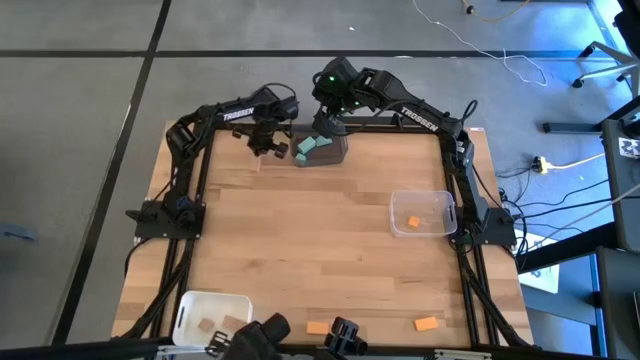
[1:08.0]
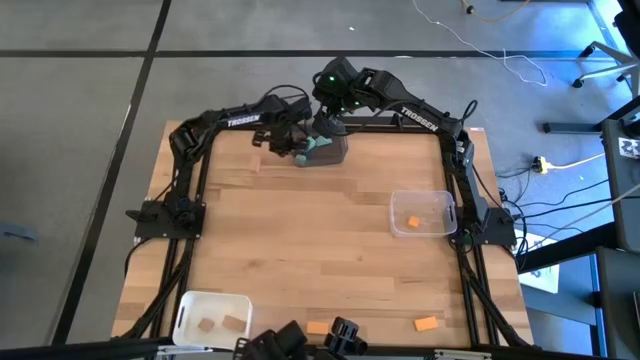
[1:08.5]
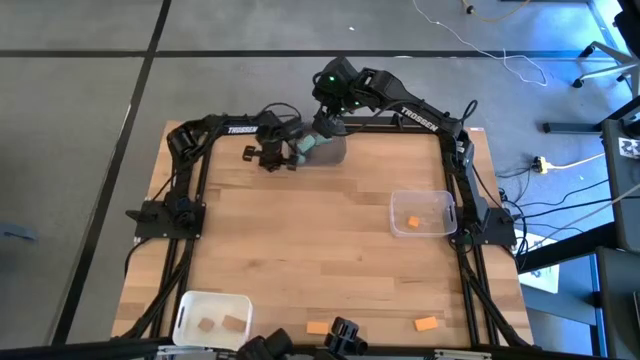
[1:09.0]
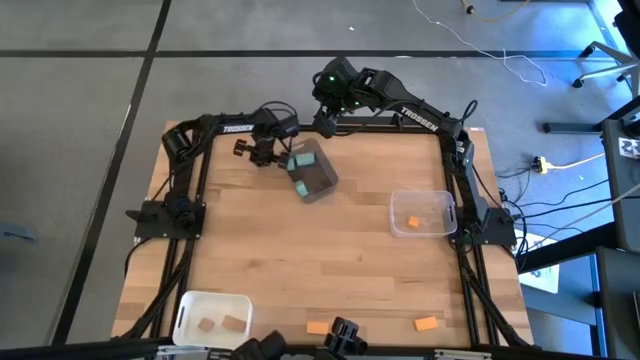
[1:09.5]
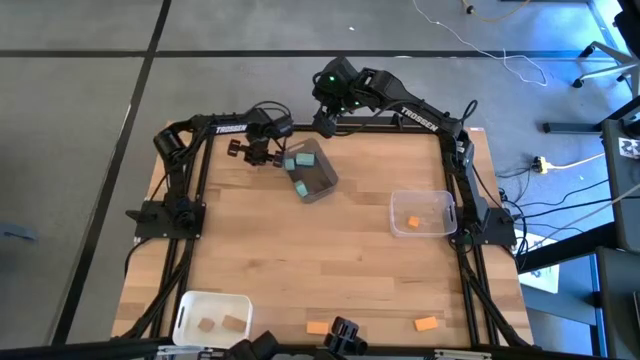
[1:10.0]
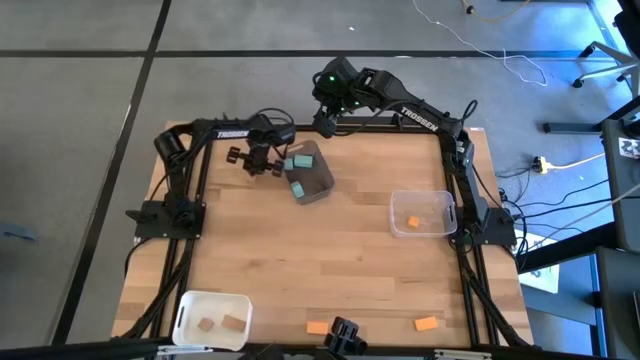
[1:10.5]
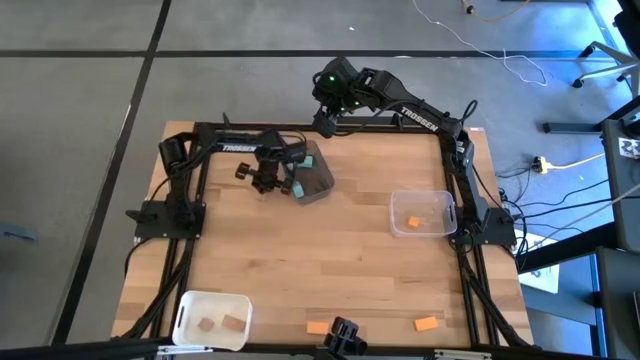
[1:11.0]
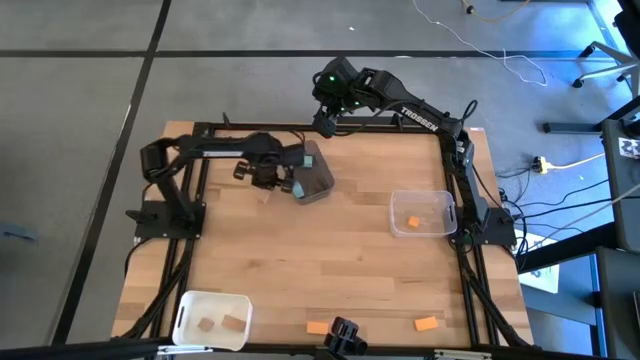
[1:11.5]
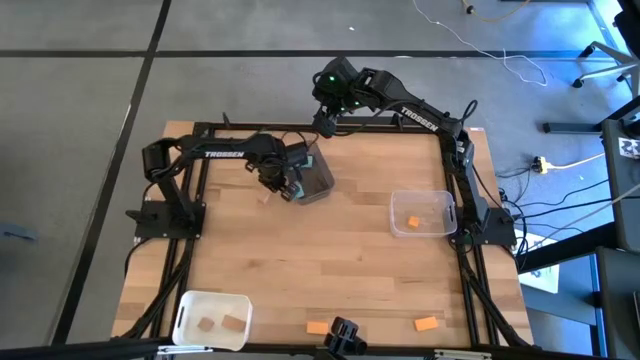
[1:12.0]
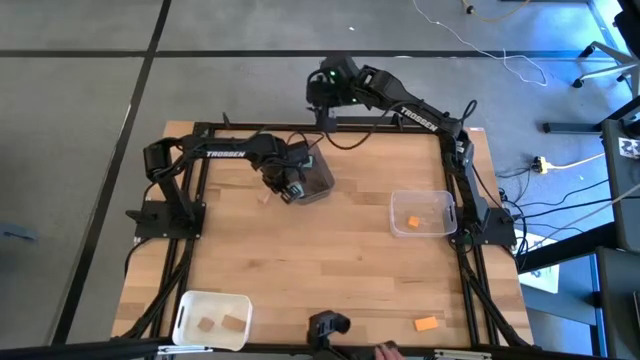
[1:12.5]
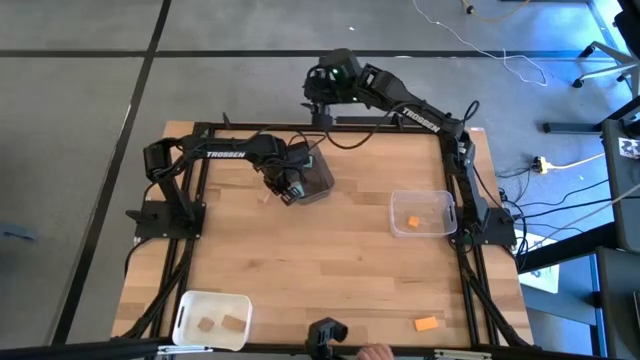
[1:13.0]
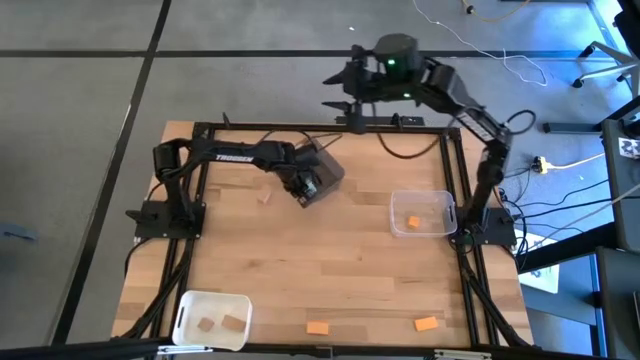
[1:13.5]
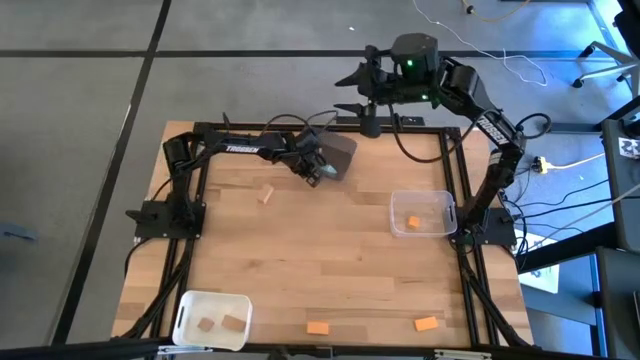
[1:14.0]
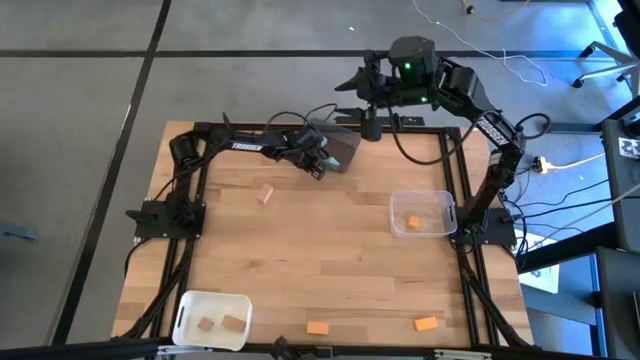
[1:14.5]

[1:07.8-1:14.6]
Task: Sort & place blocks by color
Adjust the black bin

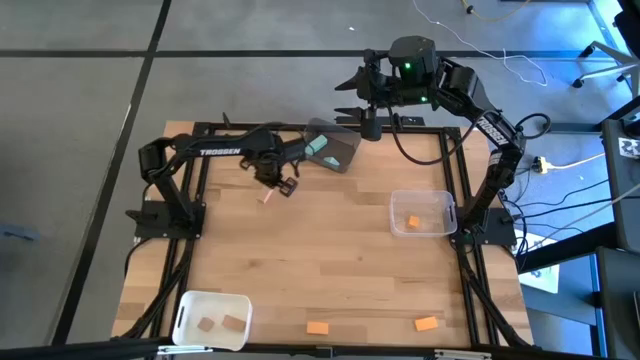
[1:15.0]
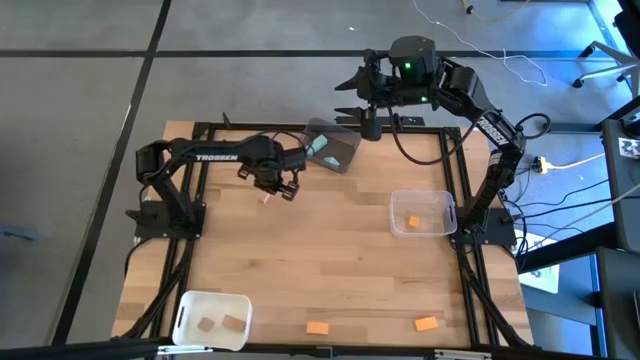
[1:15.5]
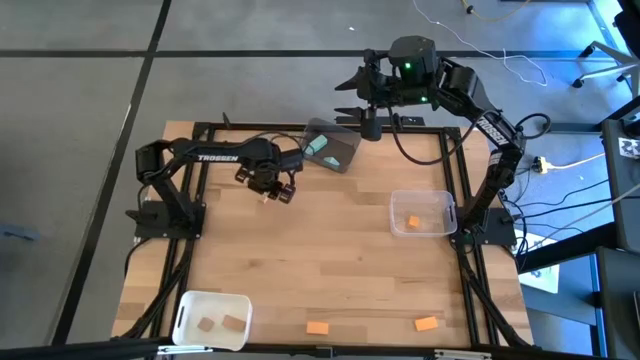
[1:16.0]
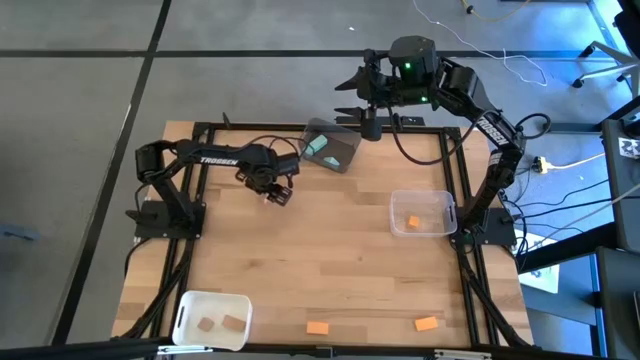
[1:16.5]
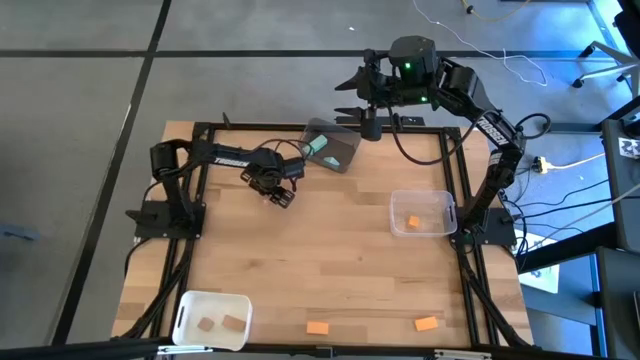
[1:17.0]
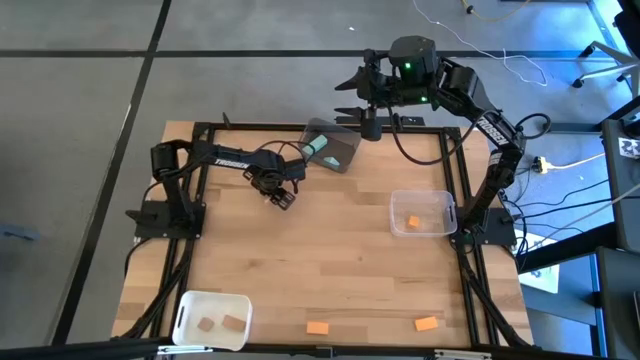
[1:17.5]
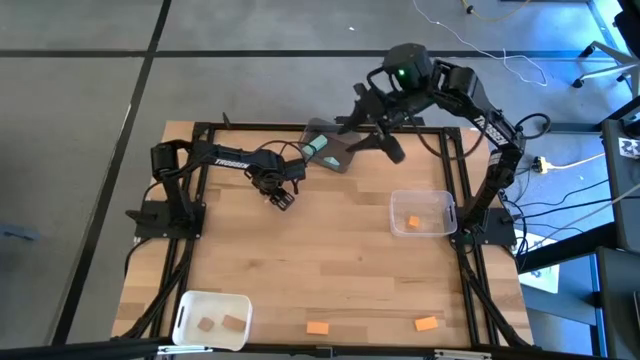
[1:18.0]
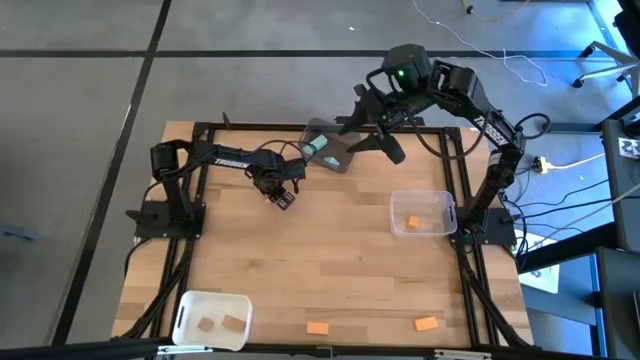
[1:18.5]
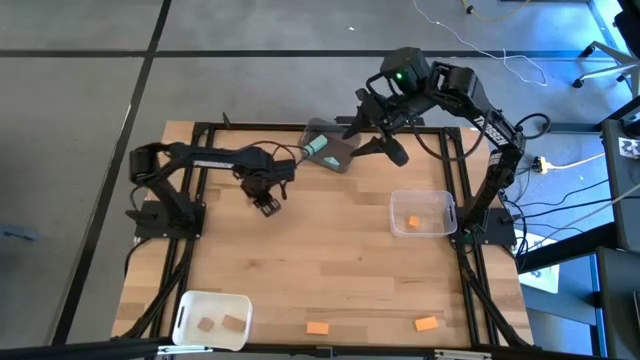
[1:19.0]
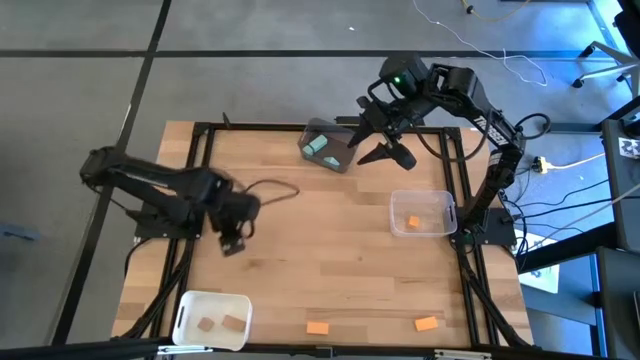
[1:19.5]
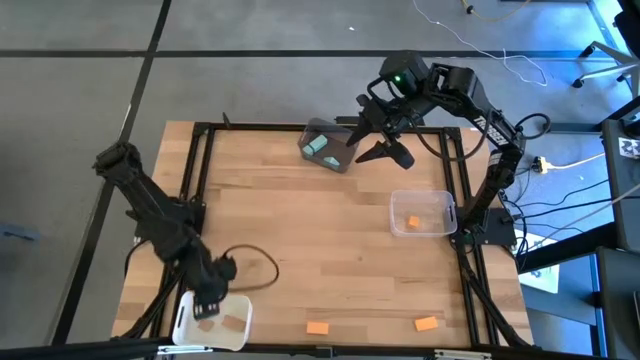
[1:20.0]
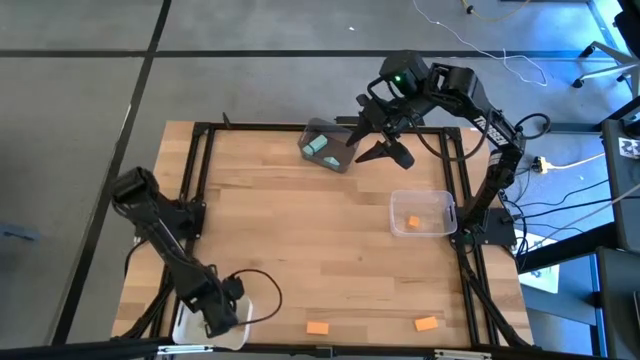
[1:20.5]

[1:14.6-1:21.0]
Put the brown block into the white bin

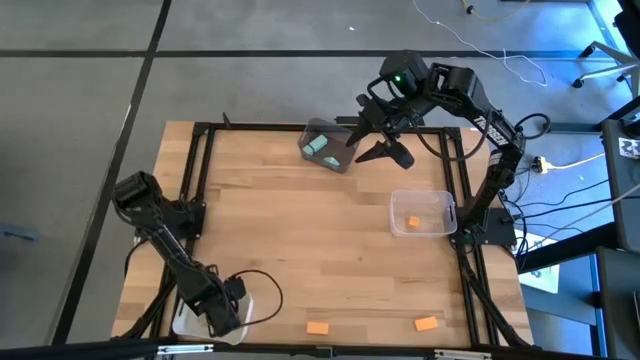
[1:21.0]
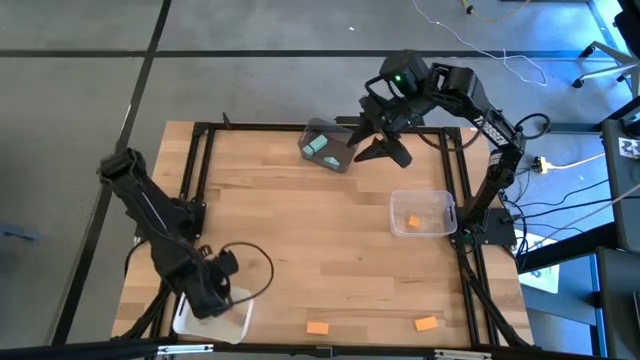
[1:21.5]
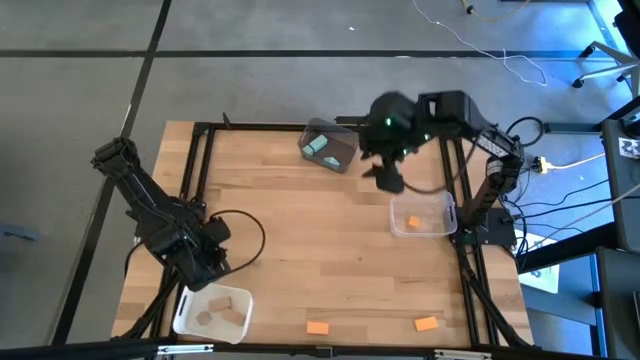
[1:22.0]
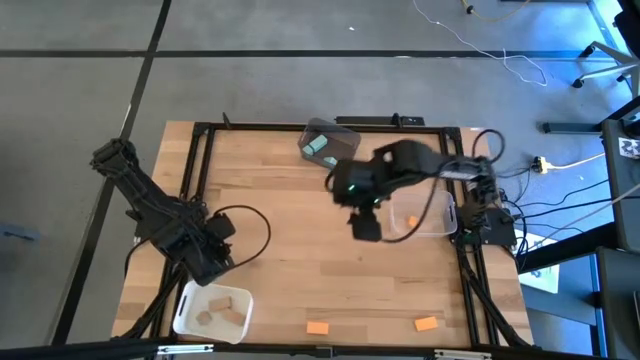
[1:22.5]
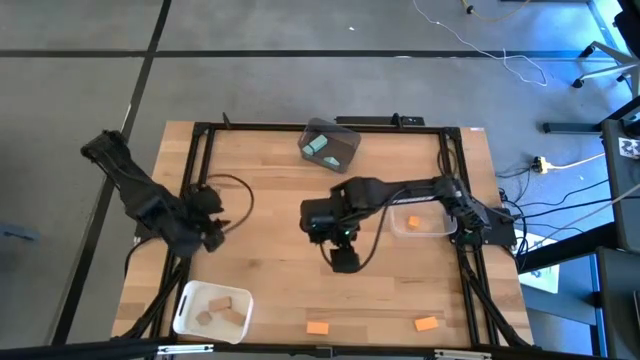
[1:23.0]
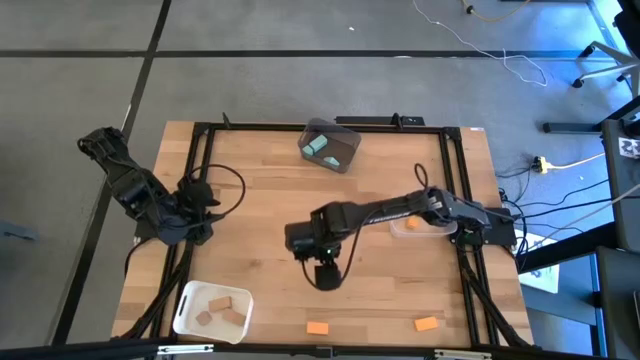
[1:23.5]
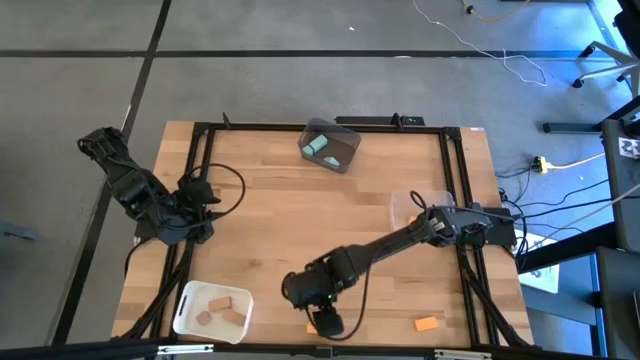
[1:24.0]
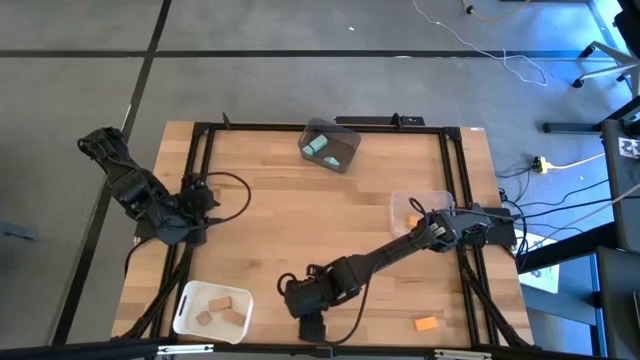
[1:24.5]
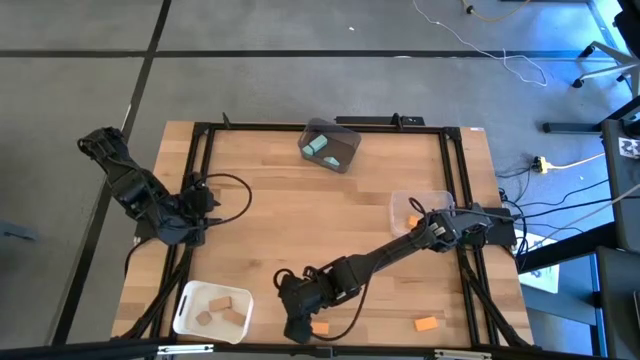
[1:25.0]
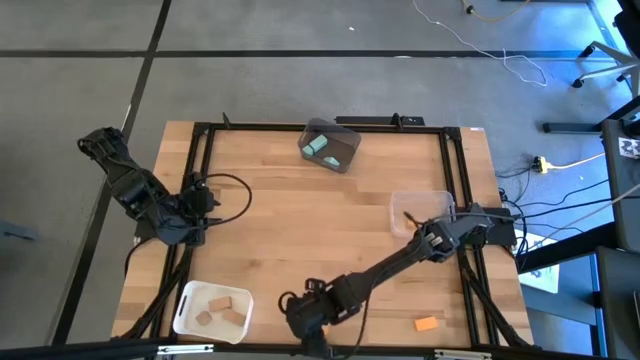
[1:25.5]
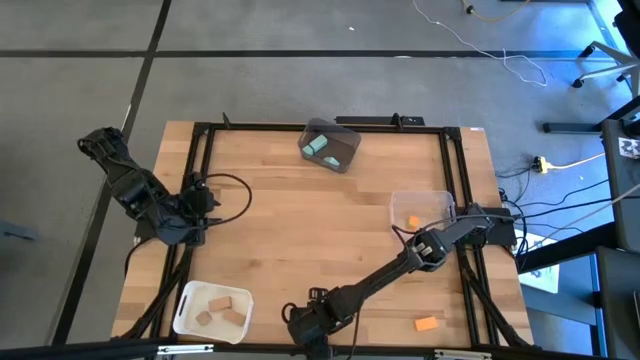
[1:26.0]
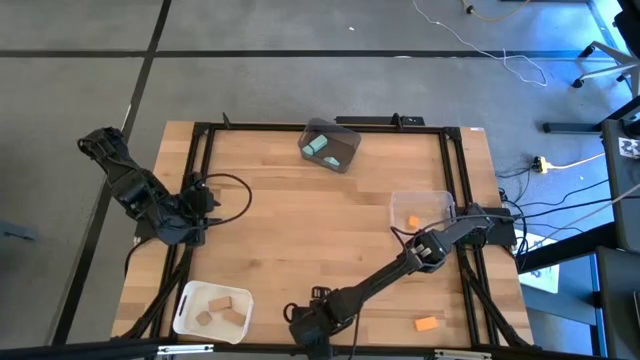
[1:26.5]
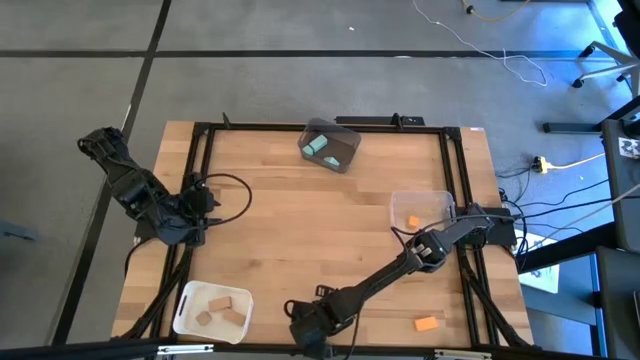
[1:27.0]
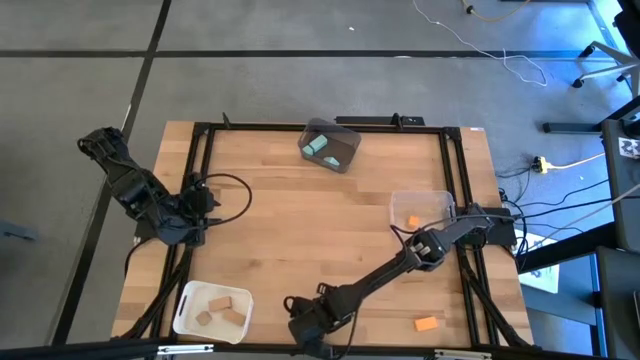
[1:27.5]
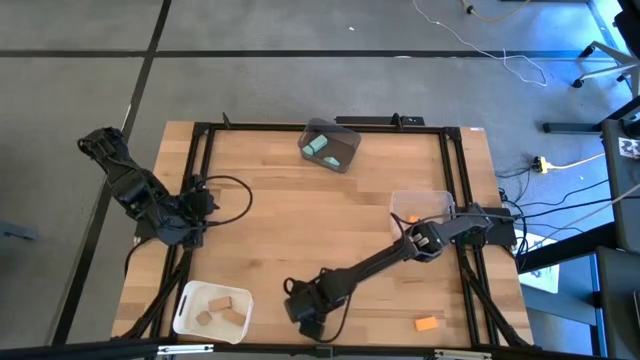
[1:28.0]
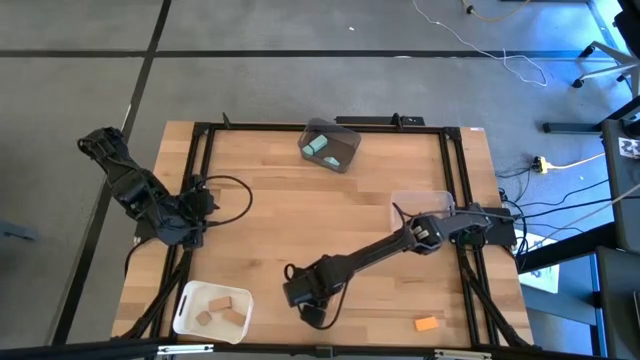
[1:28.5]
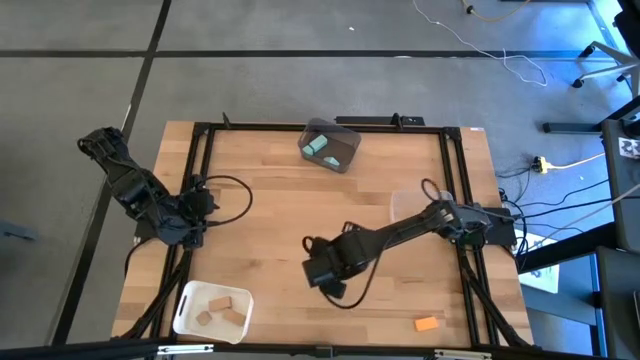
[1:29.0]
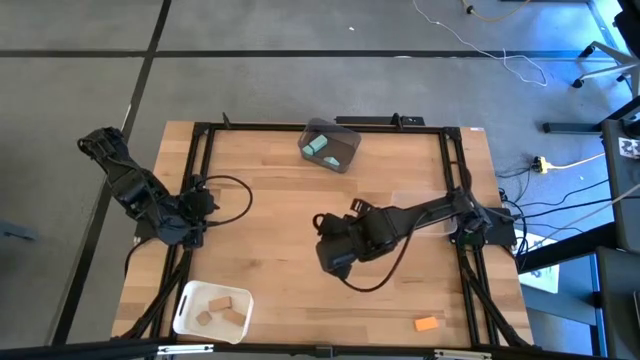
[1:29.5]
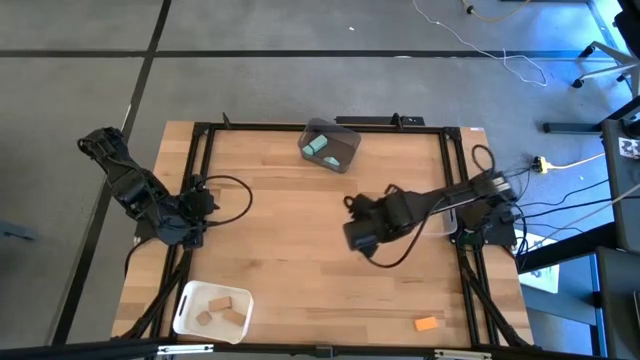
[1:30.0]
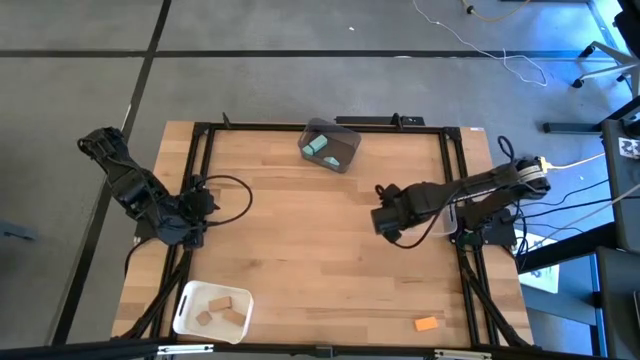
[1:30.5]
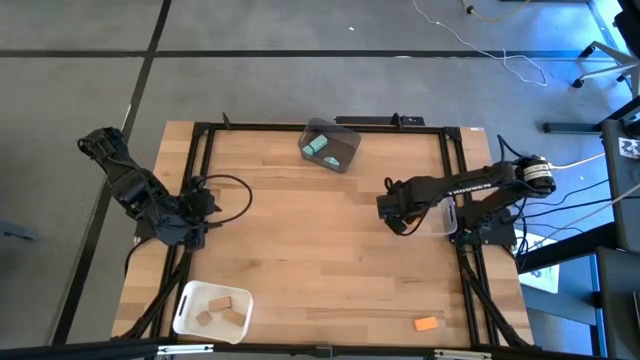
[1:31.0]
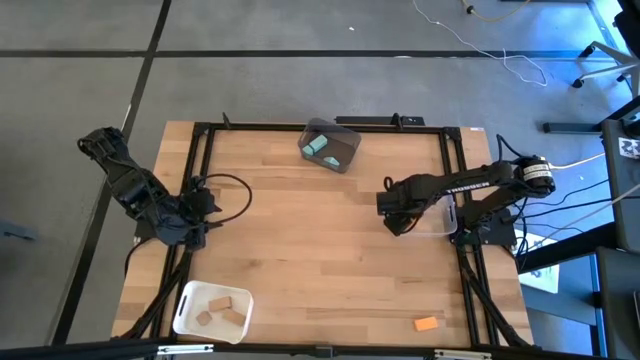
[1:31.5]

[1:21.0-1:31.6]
Put the left yellow block into the transparent bin
